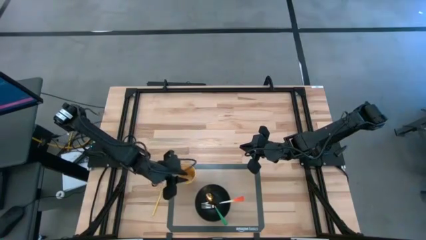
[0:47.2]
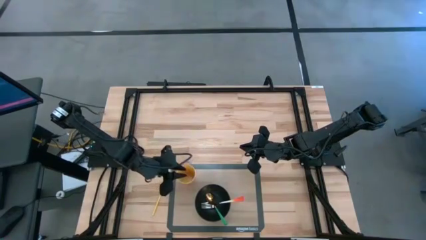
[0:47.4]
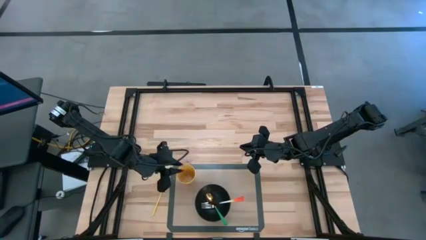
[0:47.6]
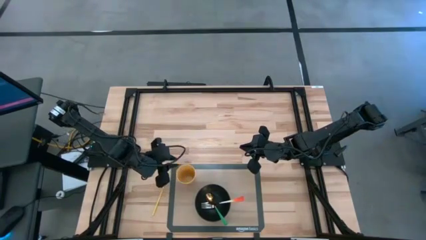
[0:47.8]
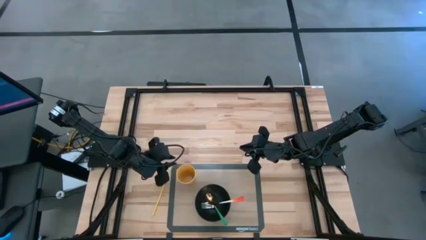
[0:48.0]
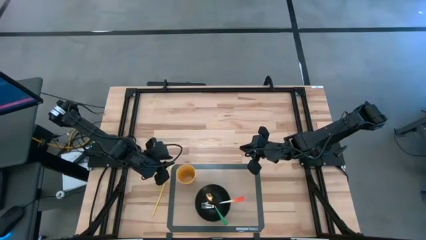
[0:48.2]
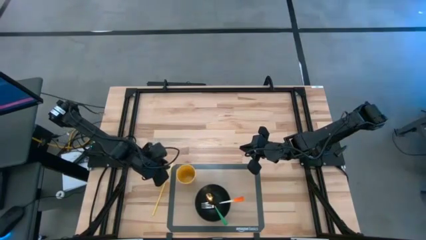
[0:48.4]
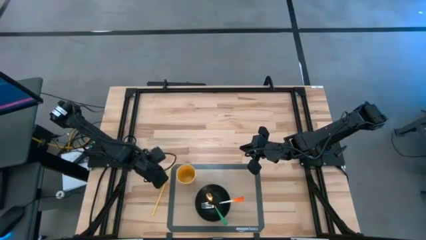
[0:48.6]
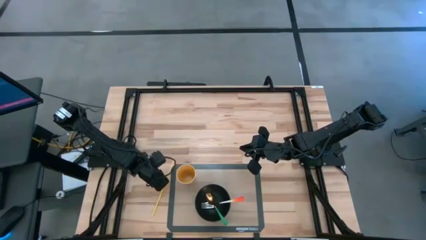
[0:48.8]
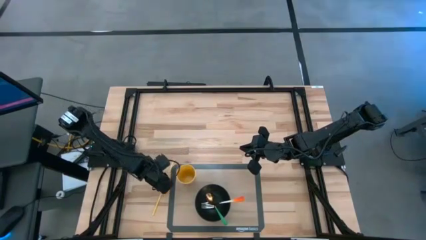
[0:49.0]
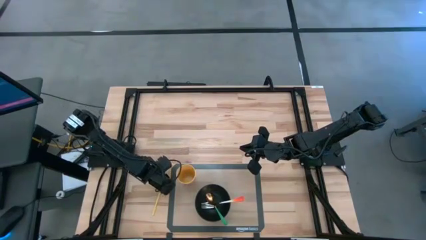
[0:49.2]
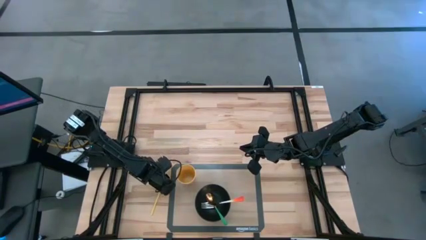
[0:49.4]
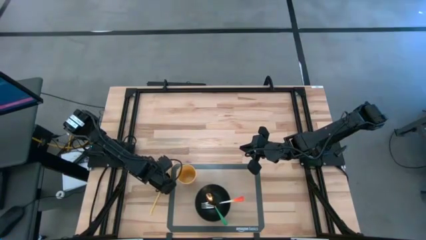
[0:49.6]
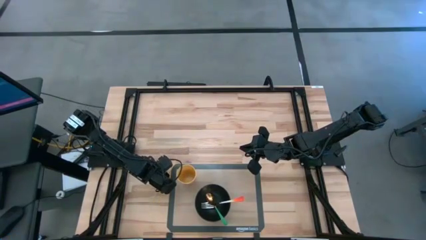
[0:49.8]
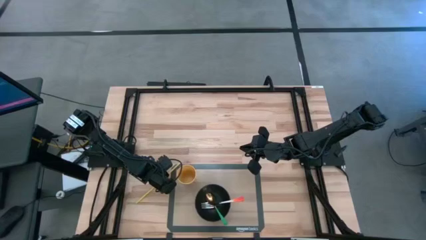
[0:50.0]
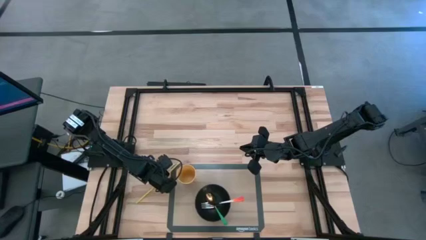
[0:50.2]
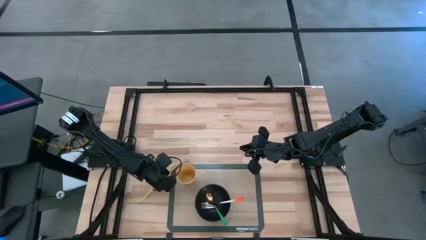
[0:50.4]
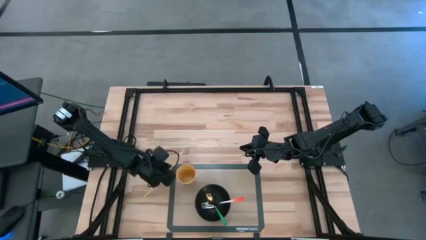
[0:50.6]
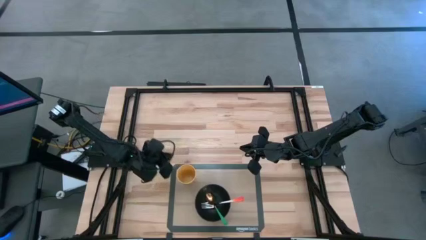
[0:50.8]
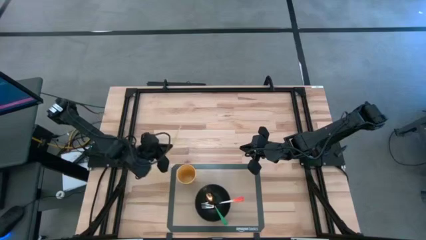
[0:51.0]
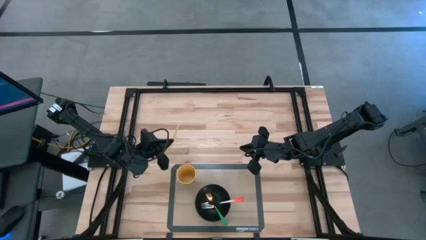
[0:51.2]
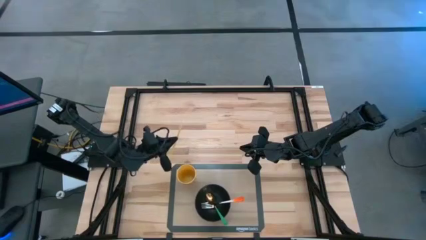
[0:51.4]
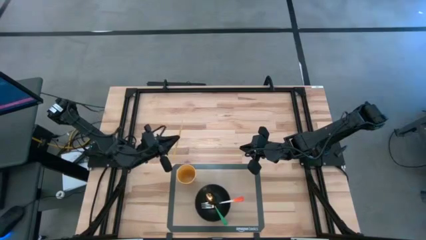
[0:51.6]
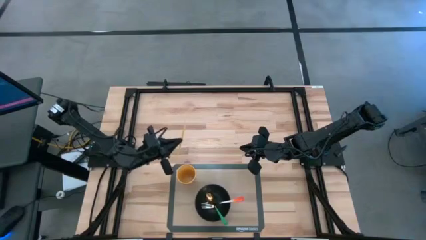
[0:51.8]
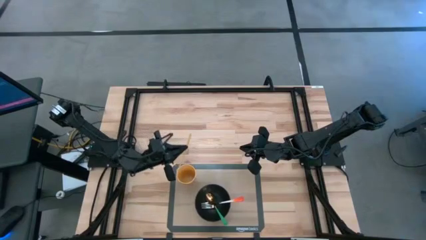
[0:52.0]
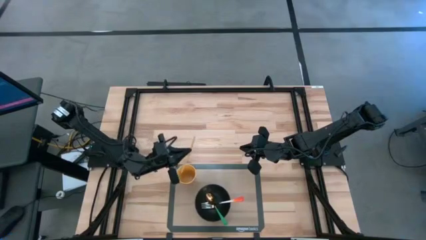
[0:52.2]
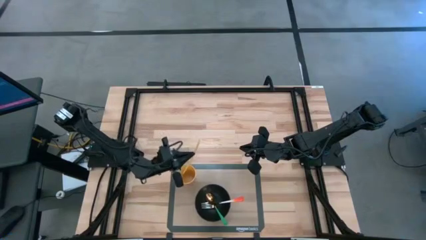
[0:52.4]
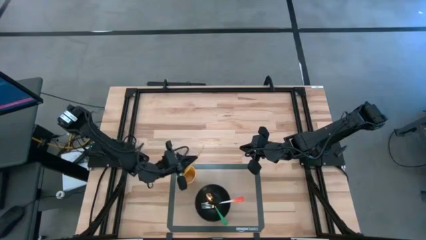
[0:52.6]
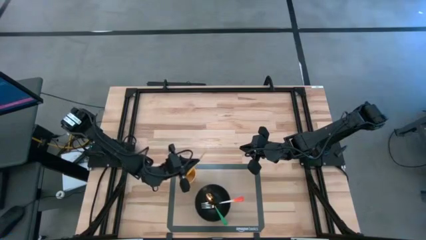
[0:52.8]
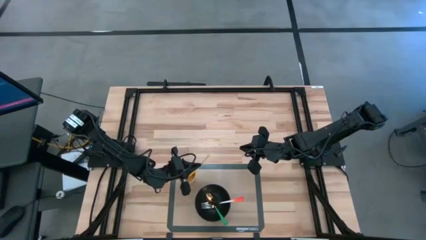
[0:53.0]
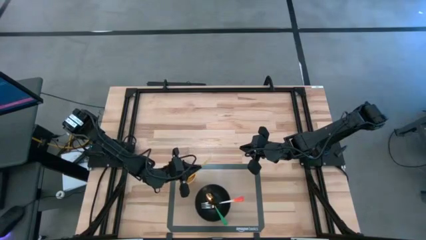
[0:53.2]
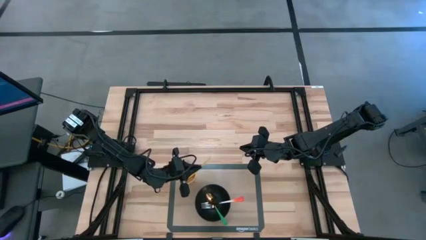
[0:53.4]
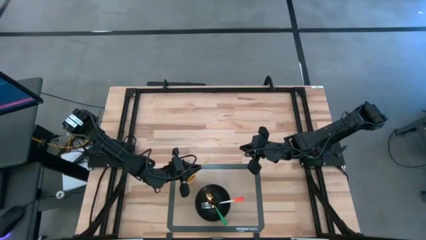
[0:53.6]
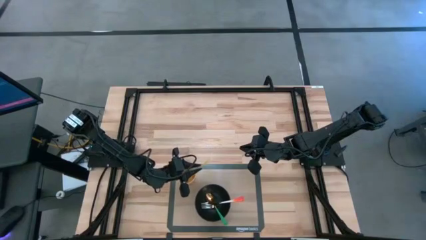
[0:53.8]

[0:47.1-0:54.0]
Task: Pick & Place Utensil
Put the yellow straw into the yellow cup on the transparent mat

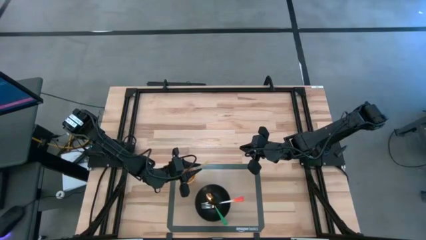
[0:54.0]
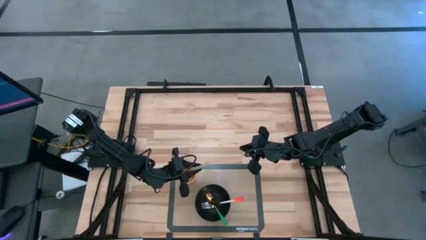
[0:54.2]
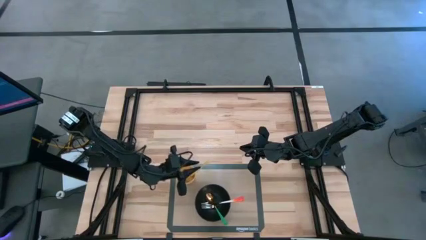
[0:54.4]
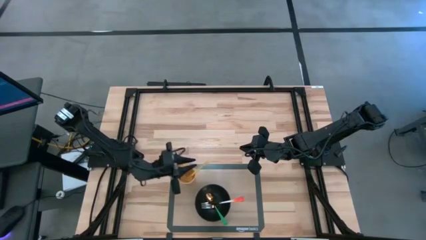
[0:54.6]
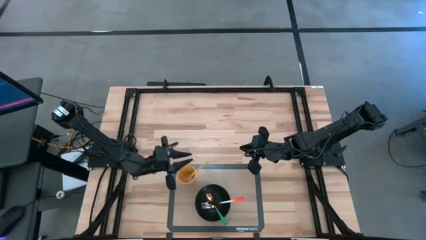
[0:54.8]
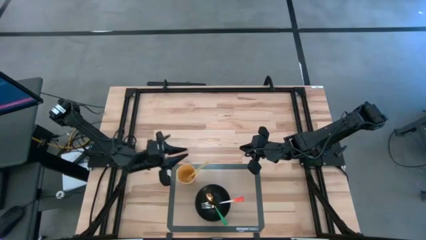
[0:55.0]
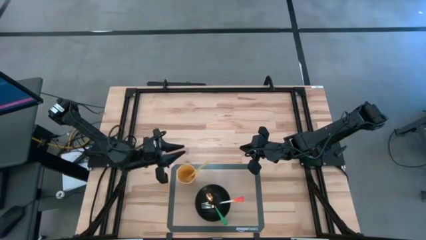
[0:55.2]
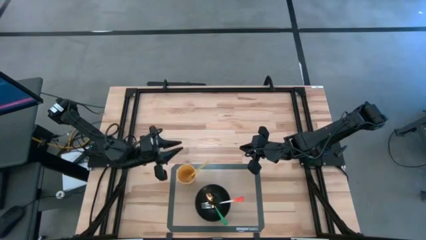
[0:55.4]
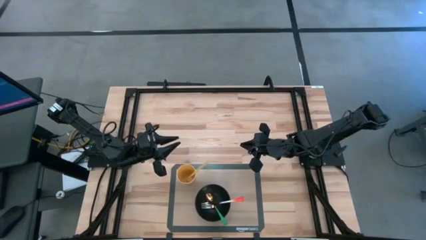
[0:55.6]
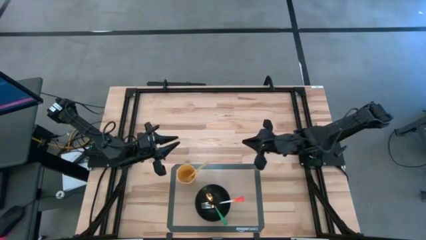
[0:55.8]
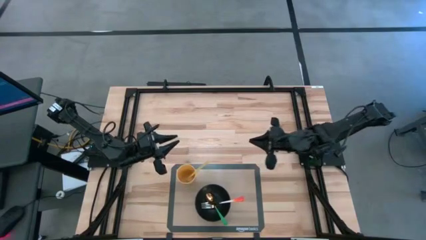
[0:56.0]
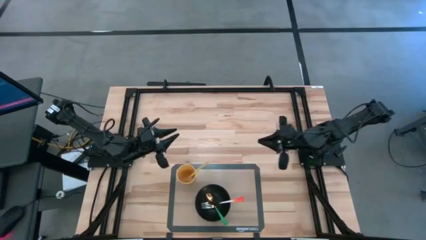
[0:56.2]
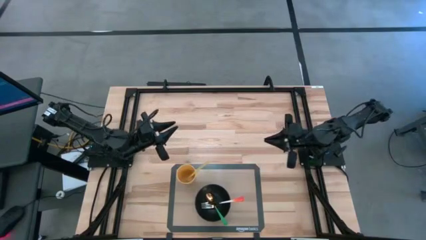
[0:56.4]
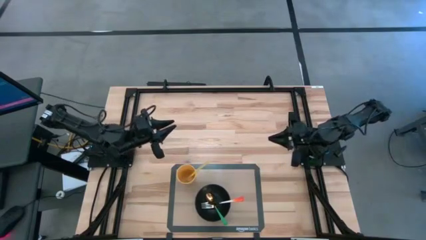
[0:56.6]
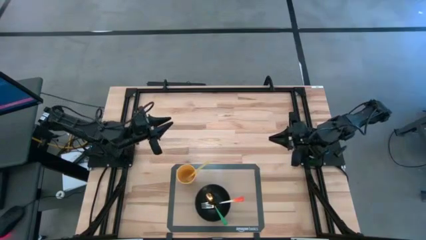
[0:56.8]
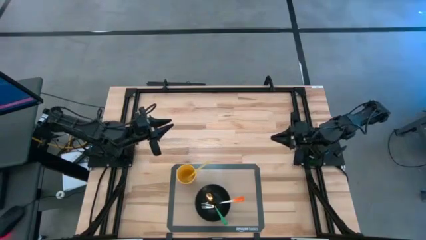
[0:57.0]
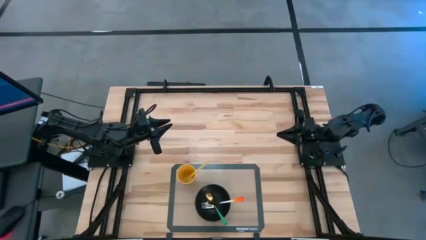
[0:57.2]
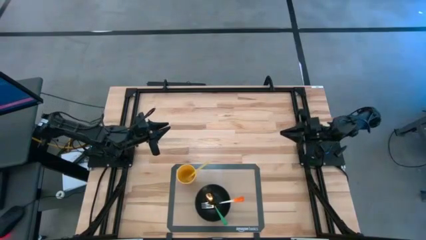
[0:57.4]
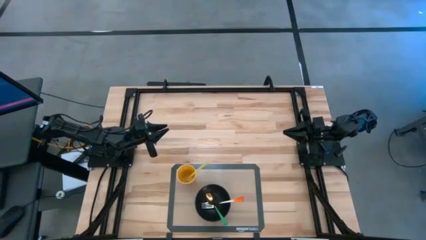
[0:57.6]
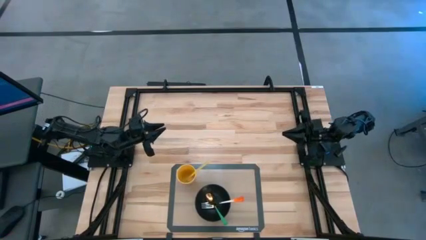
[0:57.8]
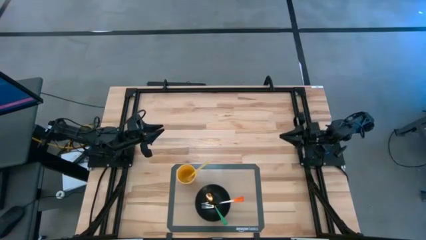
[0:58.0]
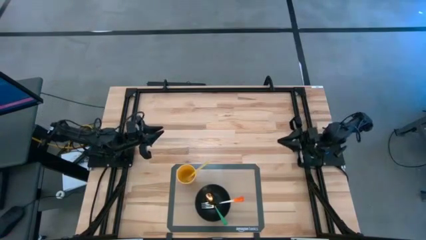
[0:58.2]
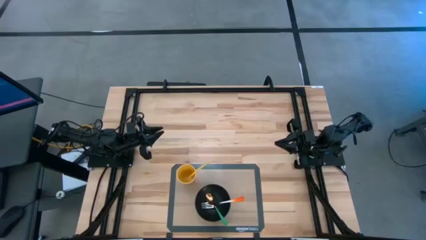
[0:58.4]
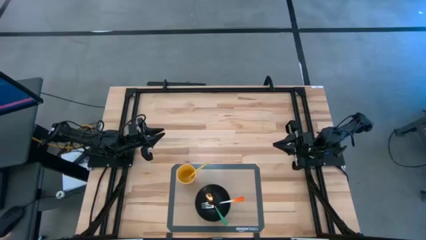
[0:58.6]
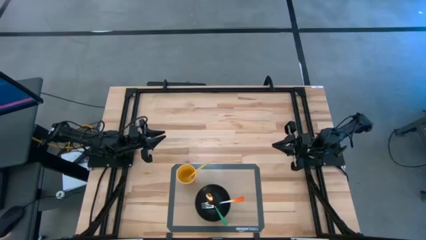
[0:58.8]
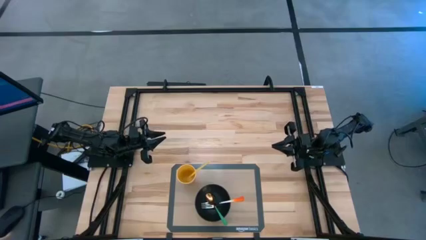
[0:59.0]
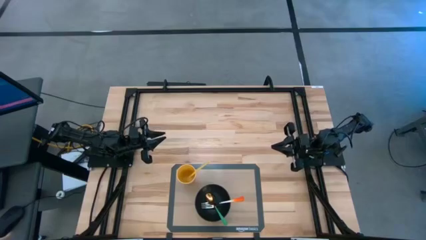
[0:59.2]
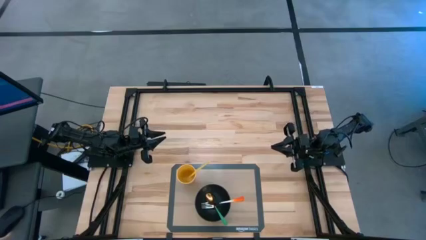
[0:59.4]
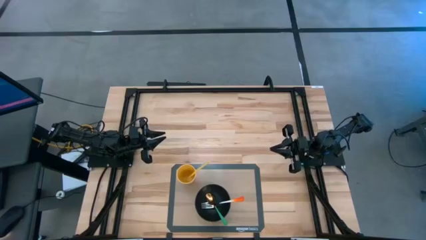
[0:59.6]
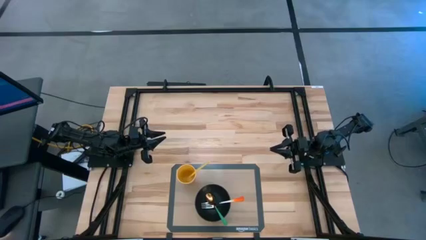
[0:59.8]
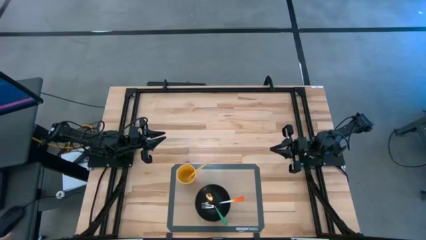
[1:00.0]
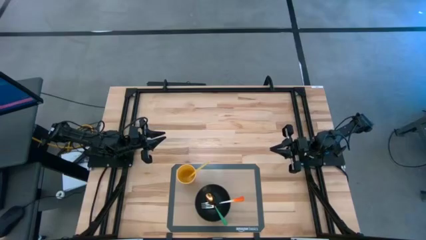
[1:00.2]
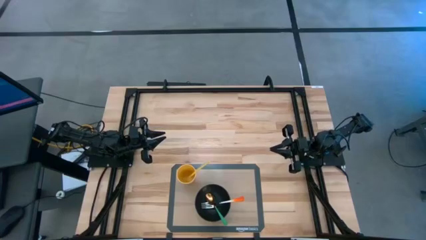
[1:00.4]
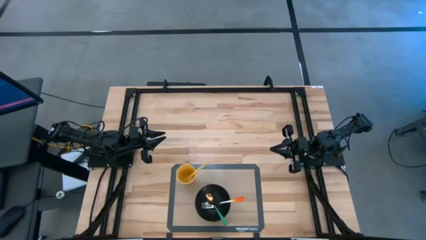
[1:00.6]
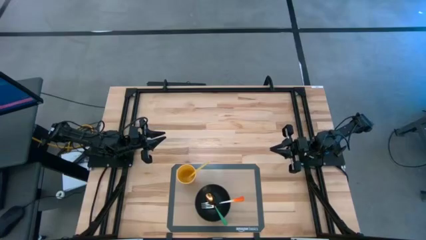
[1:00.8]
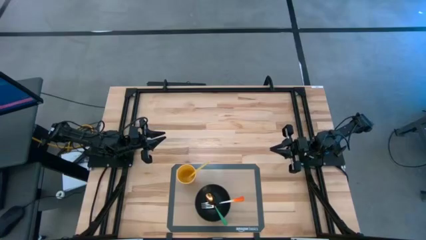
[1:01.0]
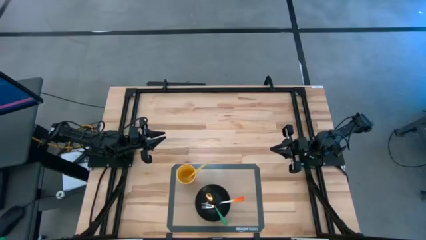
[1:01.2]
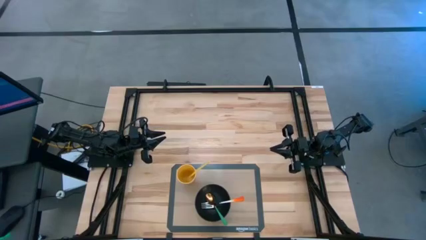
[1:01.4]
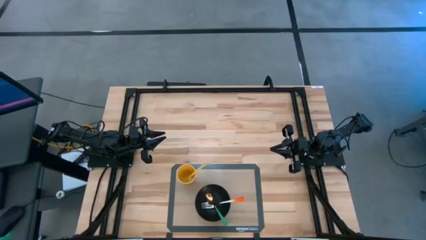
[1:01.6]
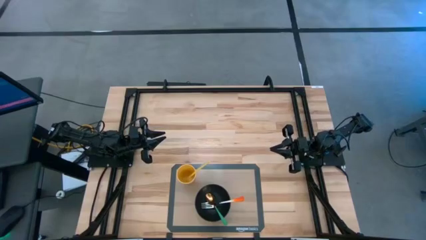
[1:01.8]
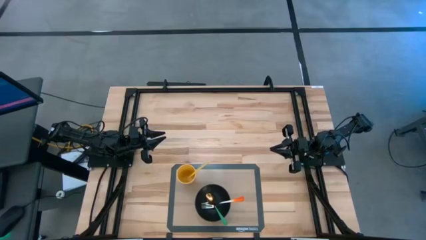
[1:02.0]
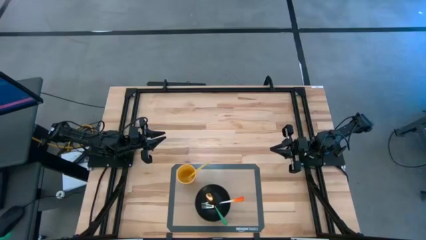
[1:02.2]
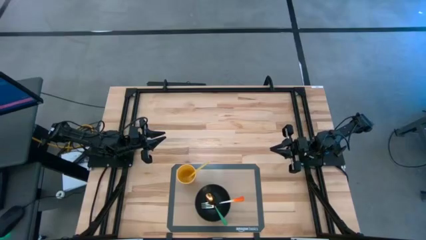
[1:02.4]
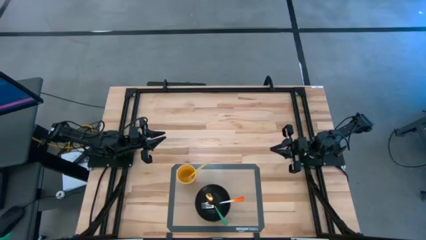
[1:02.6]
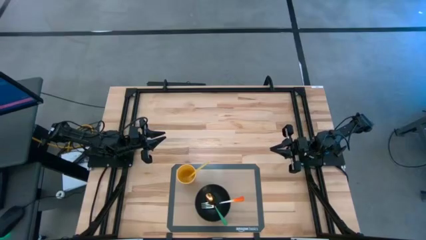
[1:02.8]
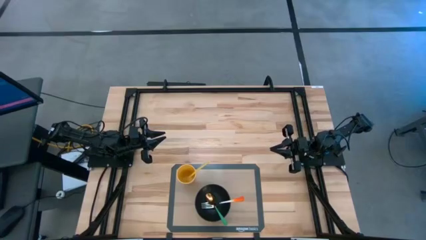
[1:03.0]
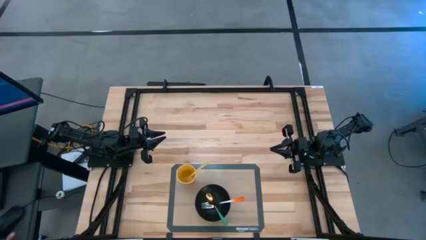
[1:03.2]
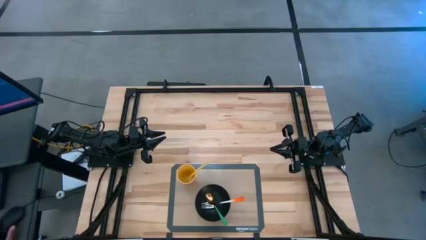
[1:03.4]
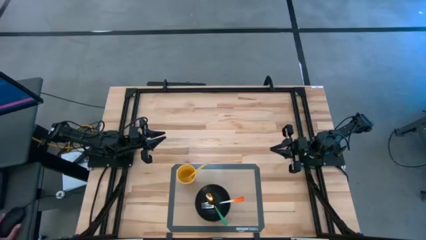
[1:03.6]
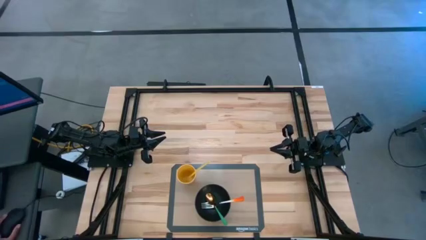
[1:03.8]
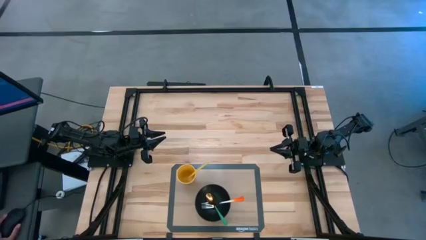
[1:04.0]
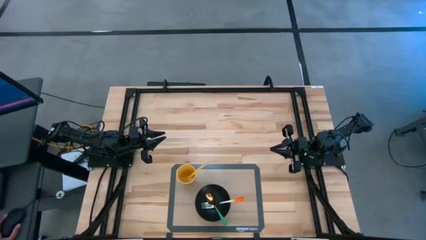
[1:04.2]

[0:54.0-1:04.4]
Return to Home Position
